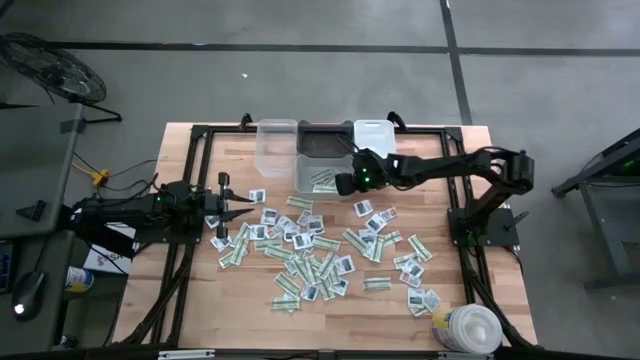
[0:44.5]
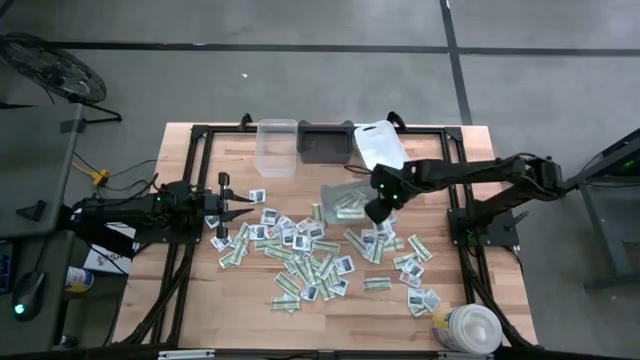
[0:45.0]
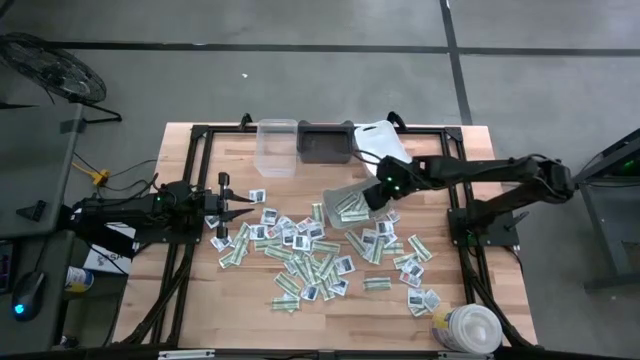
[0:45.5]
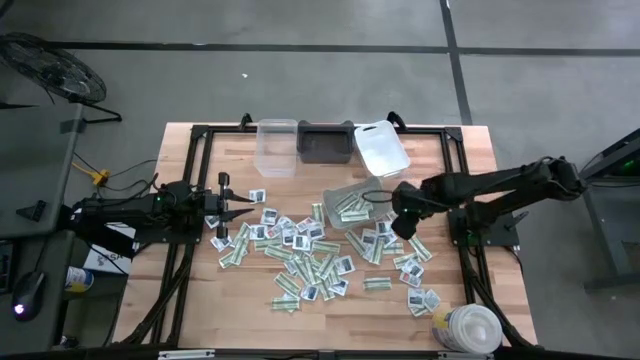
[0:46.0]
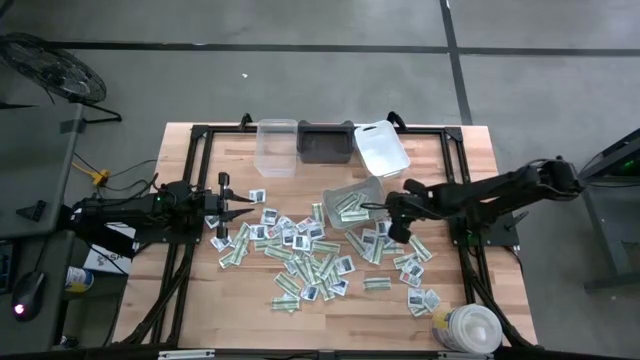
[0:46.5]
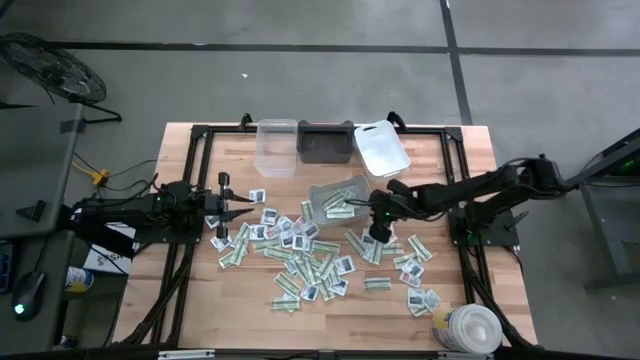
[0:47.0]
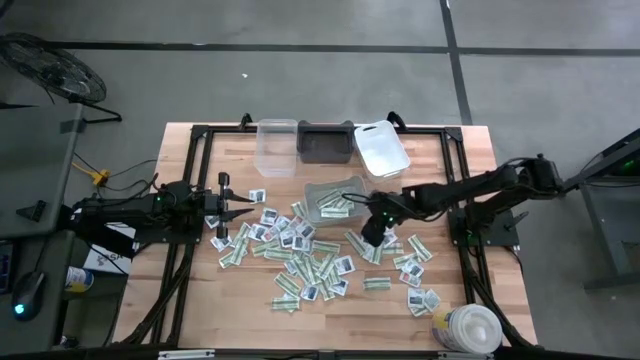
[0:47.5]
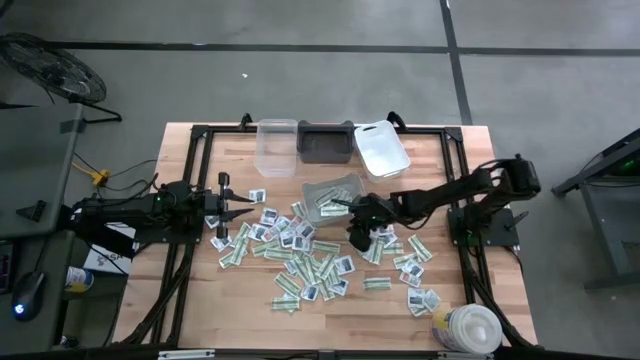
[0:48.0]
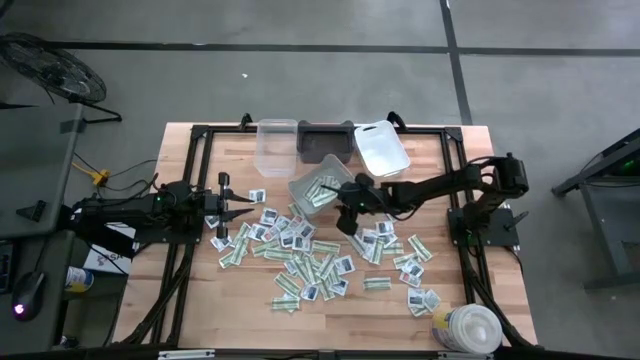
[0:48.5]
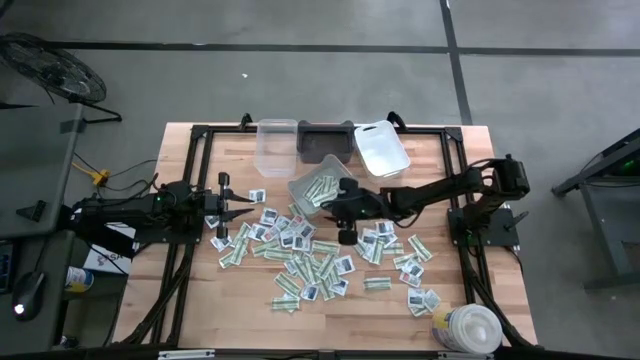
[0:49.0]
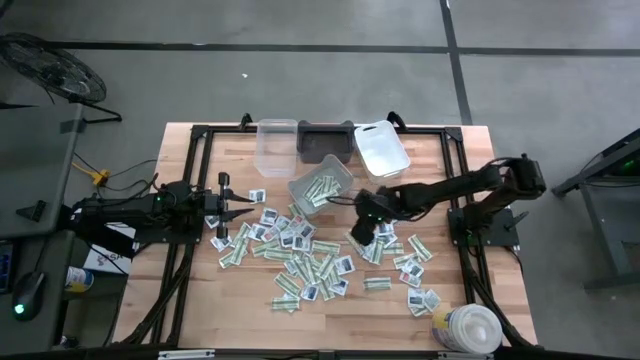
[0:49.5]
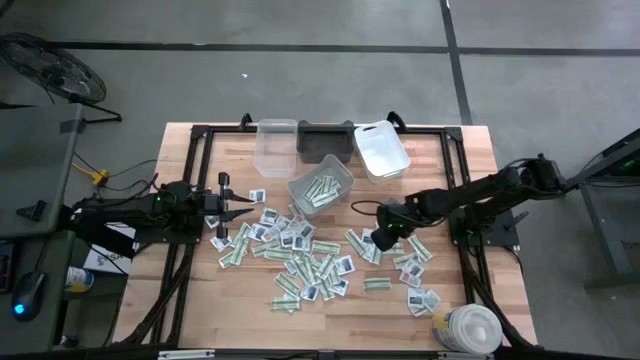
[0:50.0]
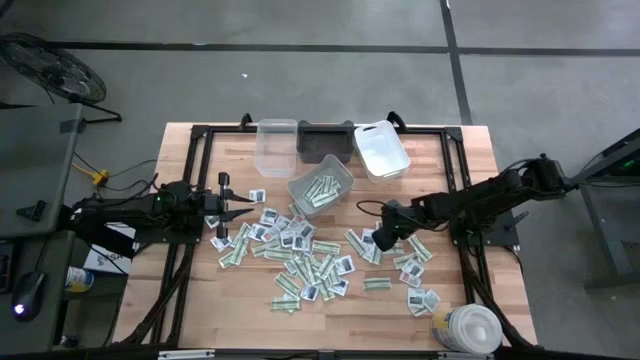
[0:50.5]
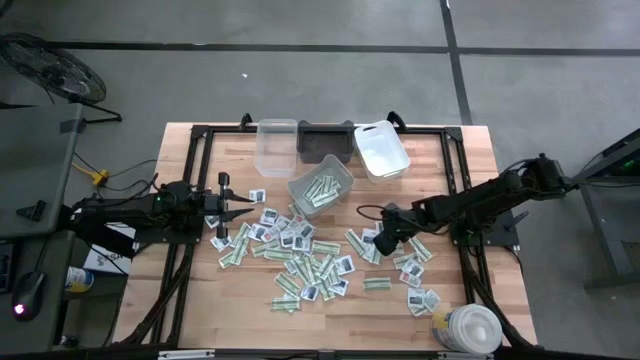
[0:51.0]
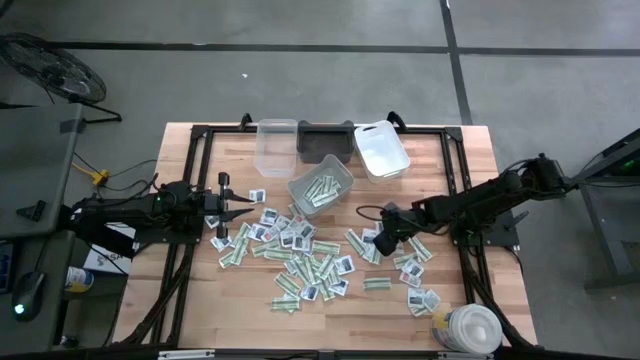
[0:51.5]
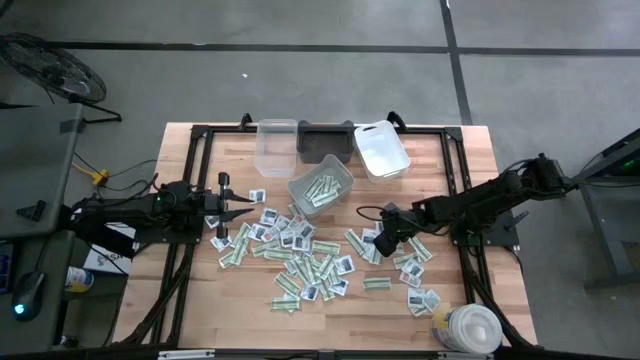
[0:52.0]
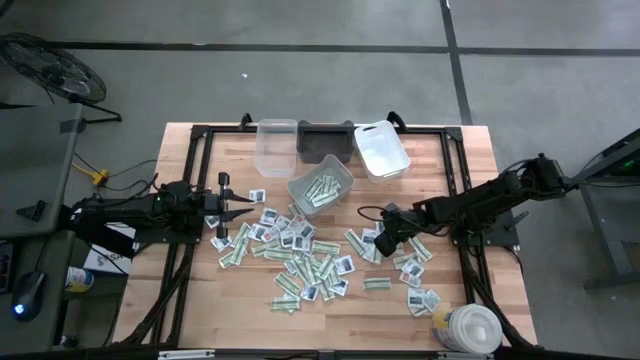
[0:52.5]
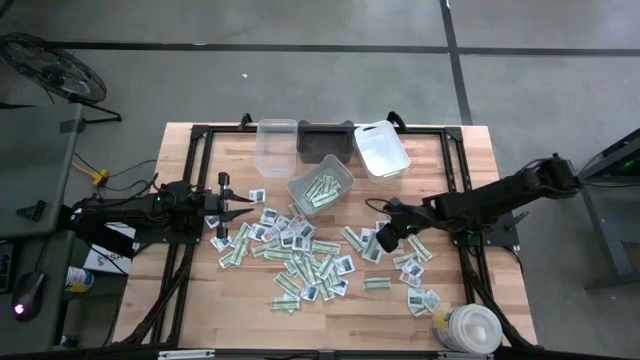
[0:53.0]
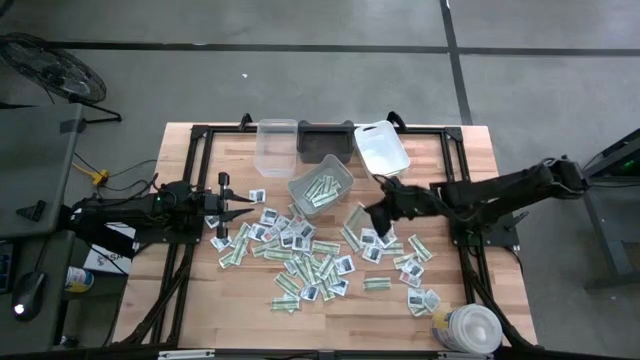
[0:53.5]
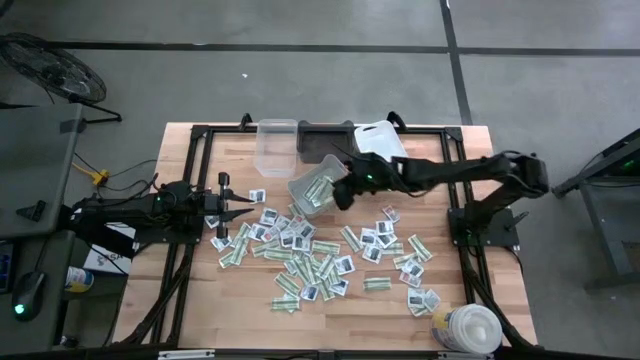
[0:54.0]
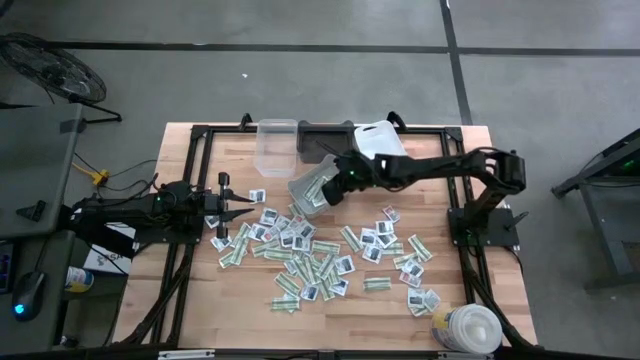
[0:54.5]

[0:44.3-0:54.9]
Task: Pick & Place First Aid Supplies
Put the bandage pack into the gray bin

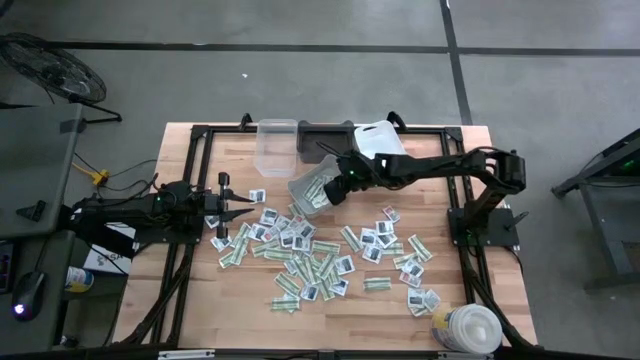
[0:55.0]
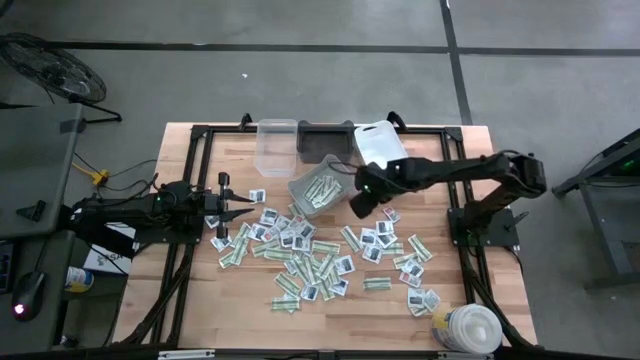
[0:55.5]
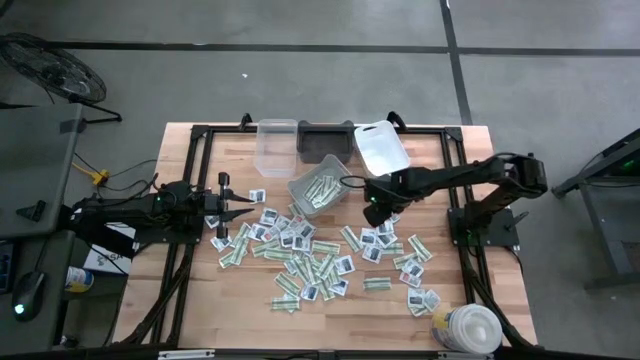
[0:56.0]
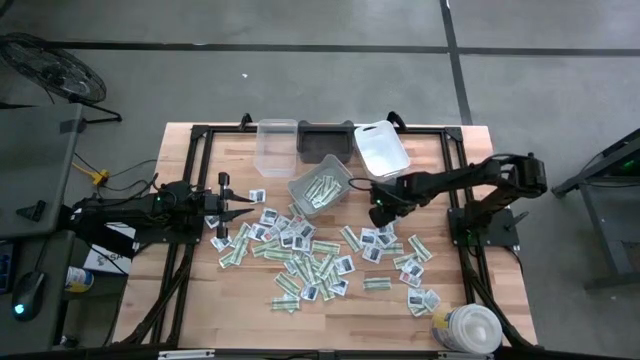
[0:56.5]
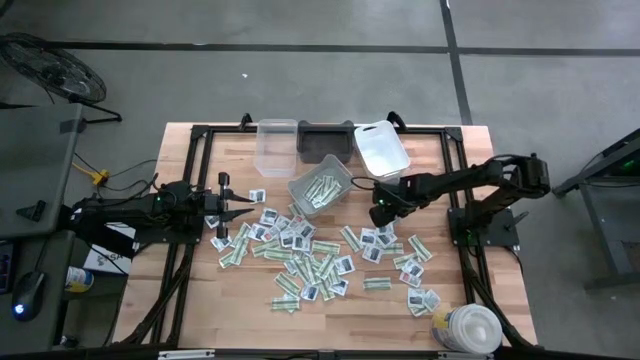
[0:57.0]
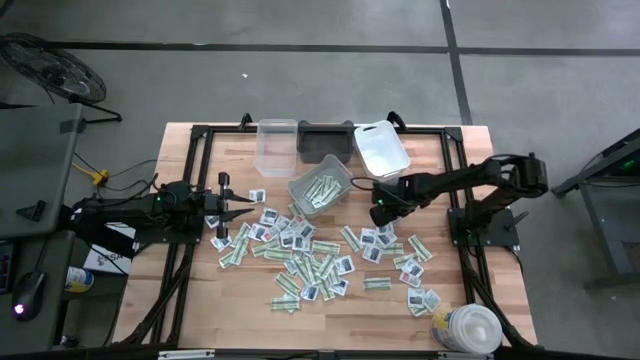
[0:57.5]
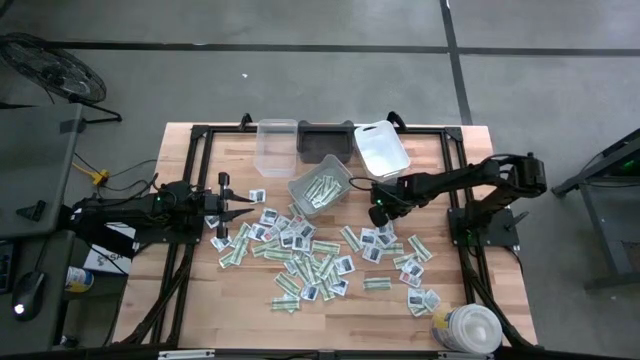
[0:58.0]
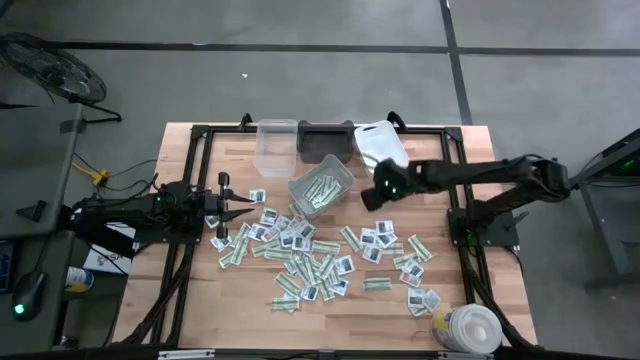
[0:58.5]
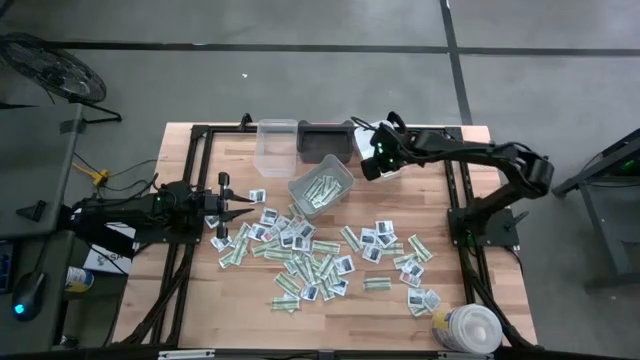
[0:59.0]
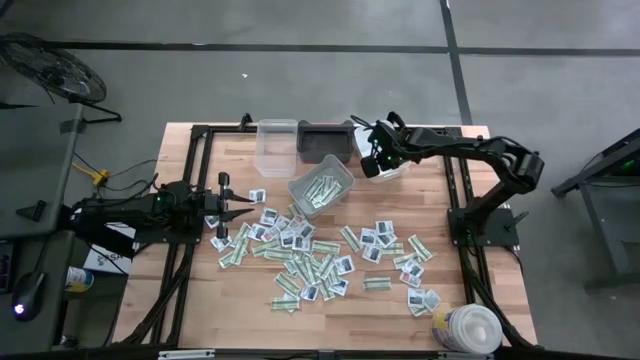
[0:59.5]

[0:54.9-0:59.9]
Put the ointment pack into the white bin

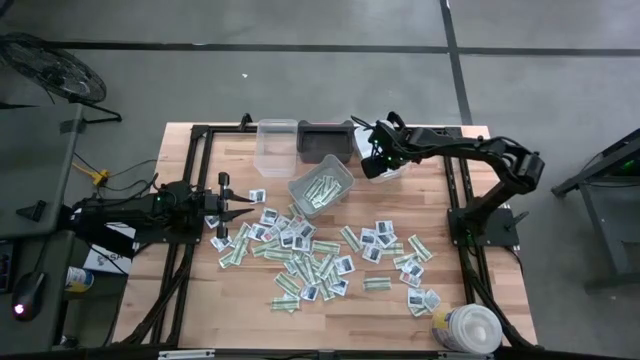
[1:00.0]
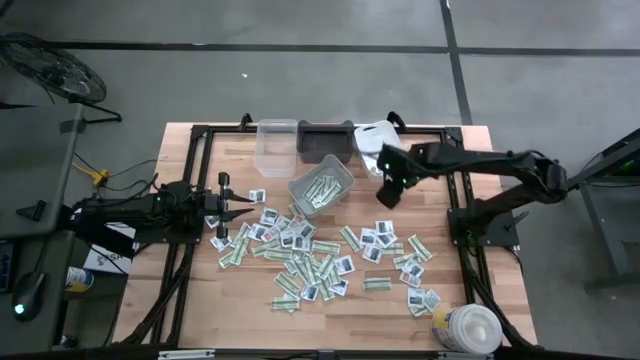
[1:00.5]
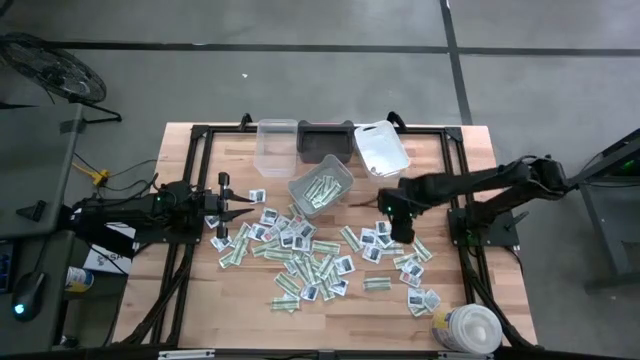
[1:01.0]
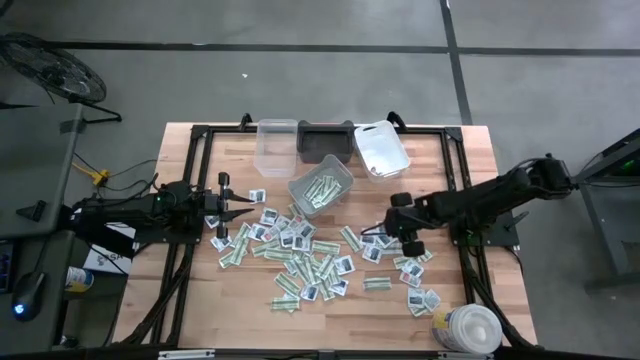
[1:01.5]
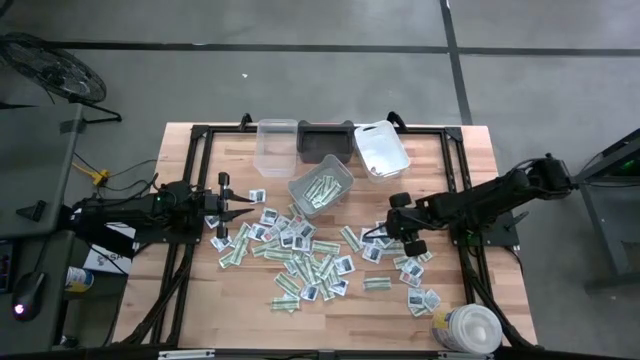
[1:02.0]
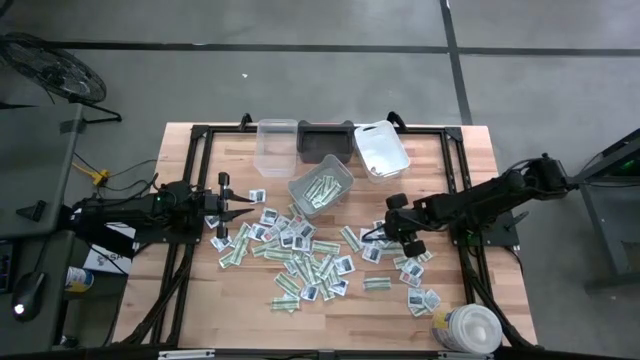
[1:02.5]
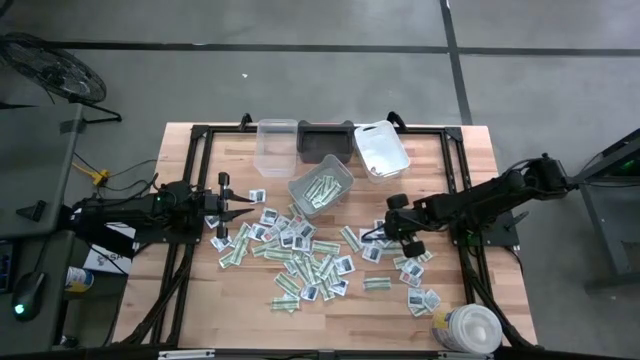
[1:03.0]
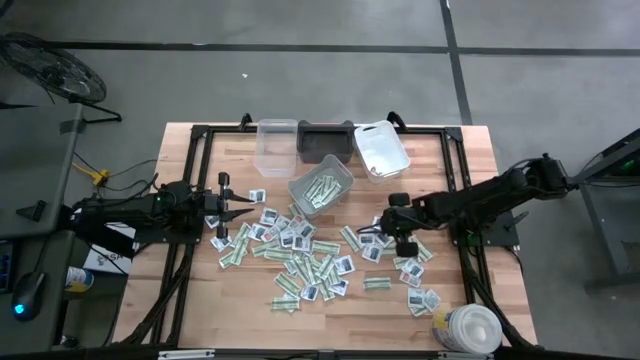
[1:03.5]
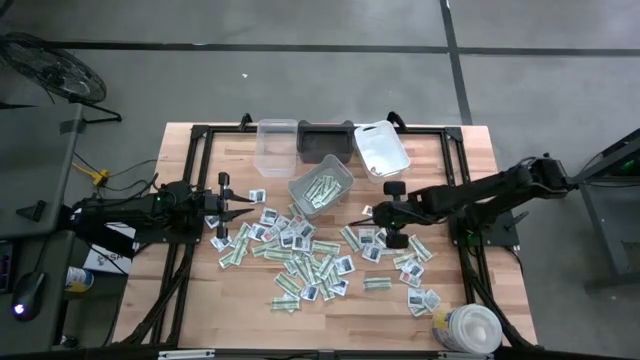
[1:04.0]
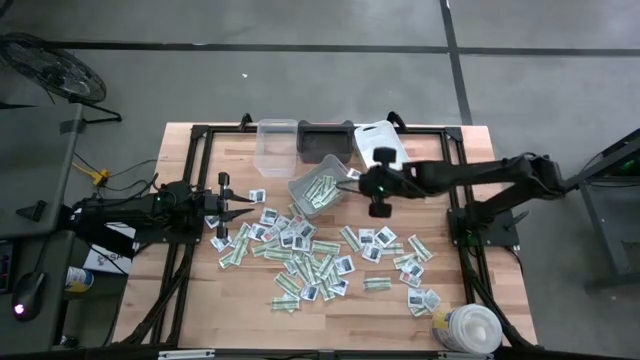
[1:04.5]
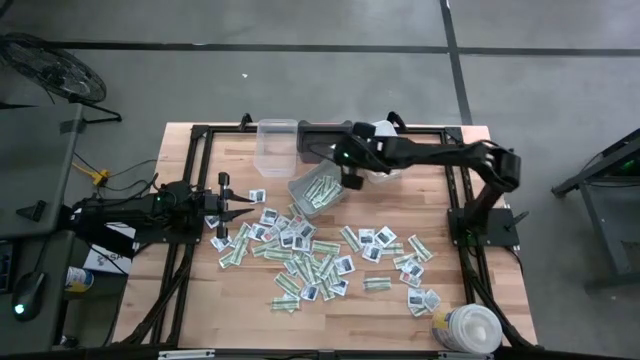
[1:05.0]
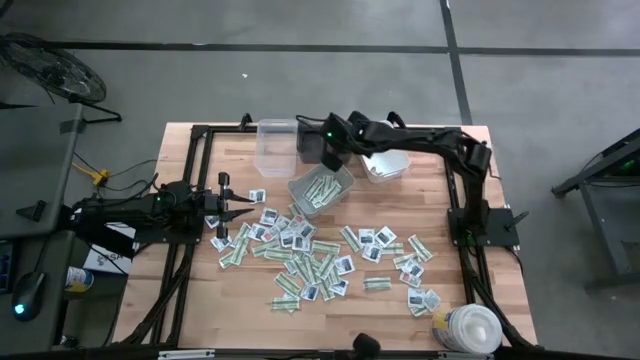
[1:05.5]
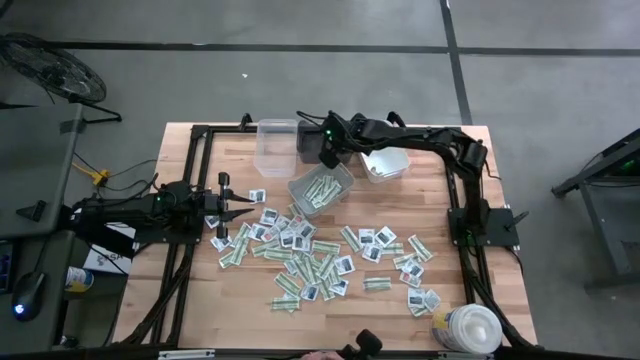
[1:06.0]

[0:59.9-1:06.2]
Put the towelette pack into the black bin
